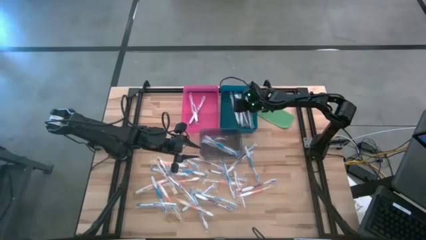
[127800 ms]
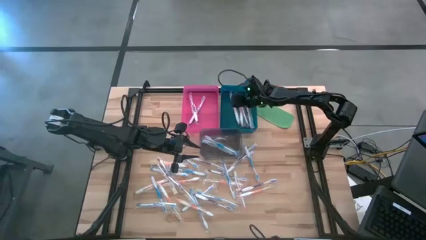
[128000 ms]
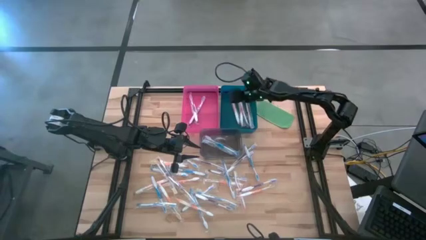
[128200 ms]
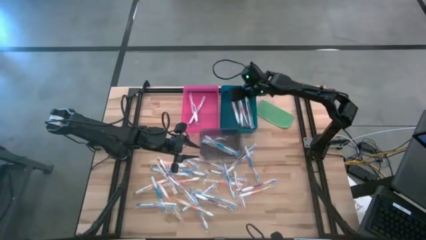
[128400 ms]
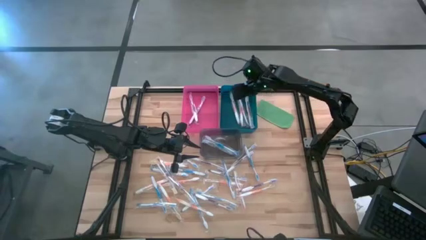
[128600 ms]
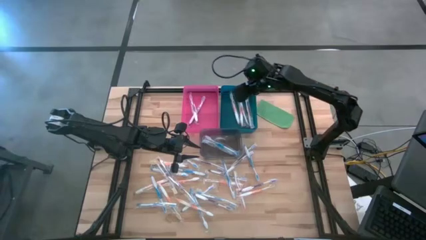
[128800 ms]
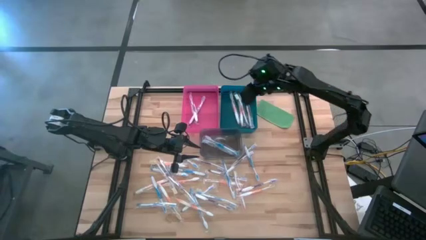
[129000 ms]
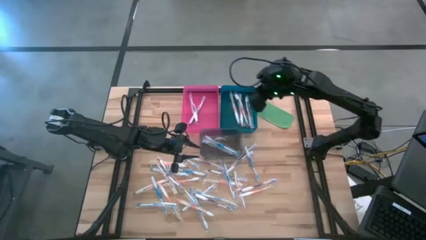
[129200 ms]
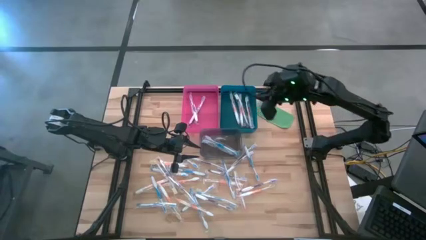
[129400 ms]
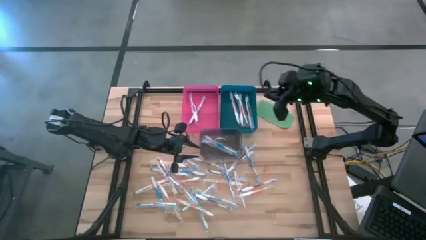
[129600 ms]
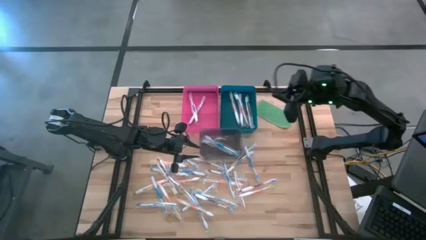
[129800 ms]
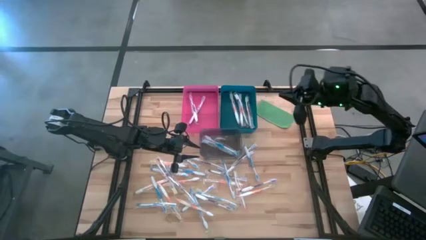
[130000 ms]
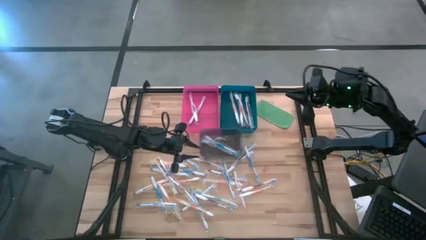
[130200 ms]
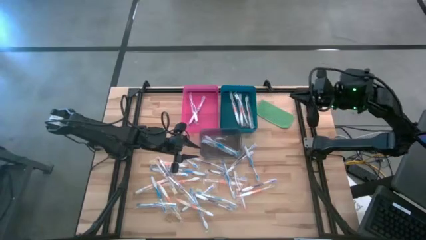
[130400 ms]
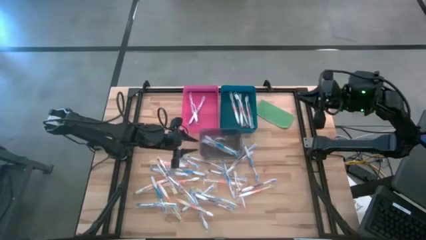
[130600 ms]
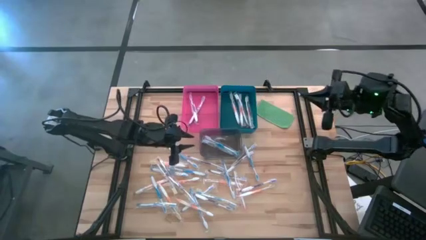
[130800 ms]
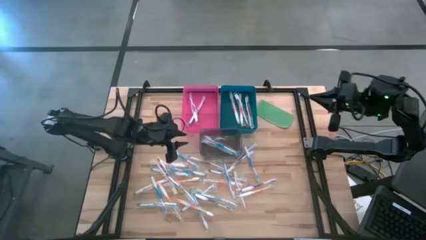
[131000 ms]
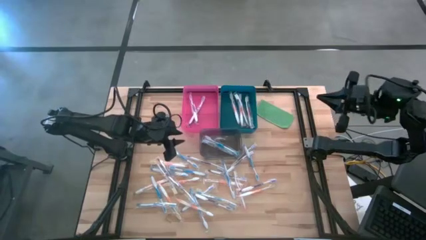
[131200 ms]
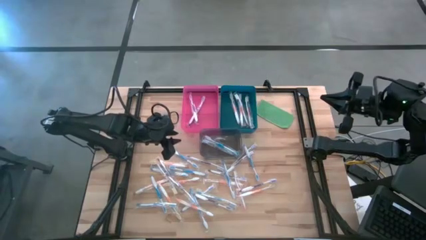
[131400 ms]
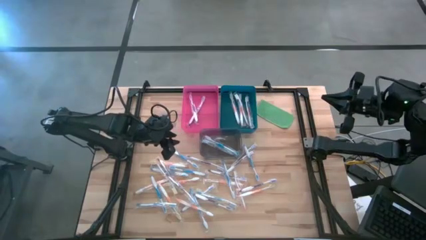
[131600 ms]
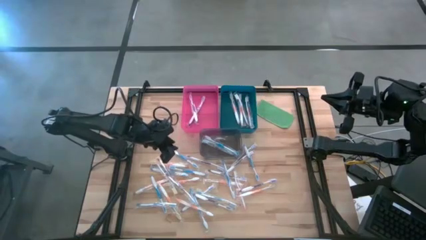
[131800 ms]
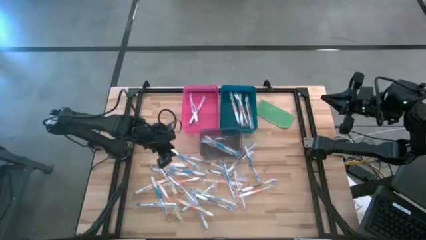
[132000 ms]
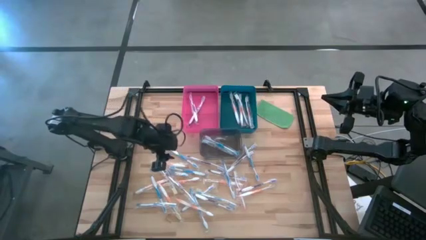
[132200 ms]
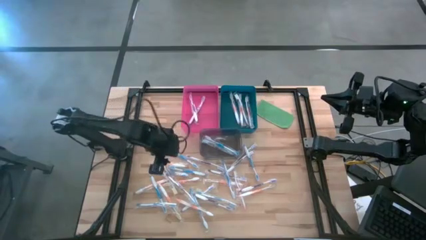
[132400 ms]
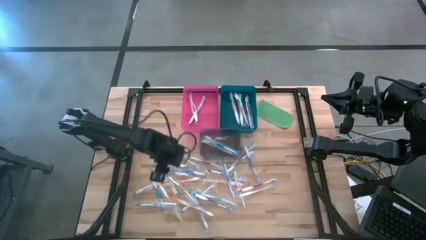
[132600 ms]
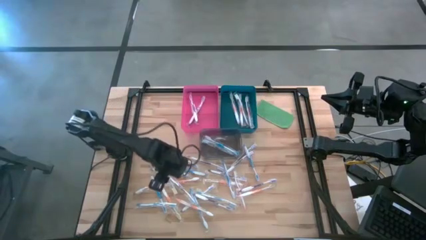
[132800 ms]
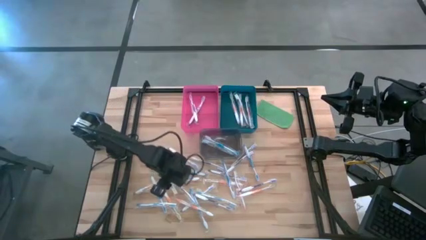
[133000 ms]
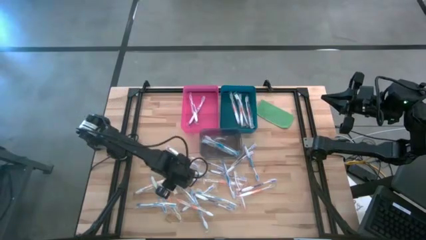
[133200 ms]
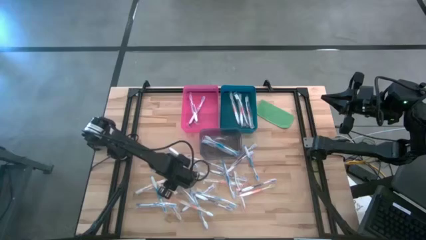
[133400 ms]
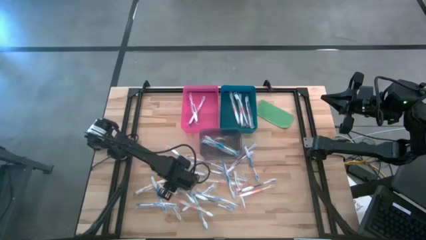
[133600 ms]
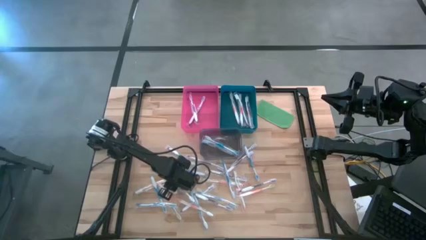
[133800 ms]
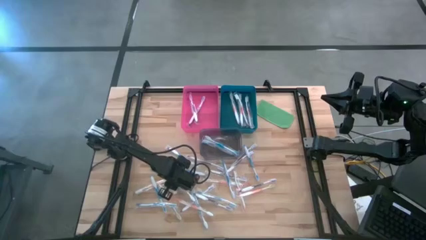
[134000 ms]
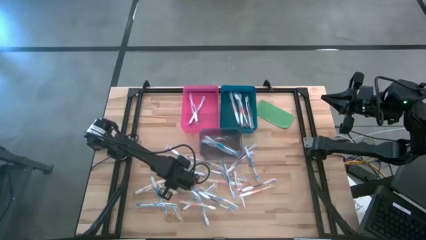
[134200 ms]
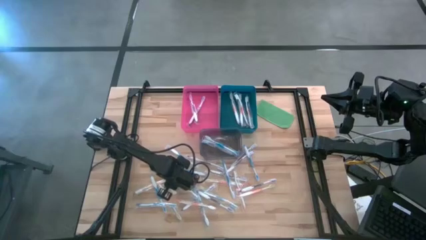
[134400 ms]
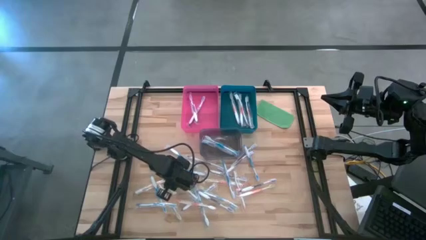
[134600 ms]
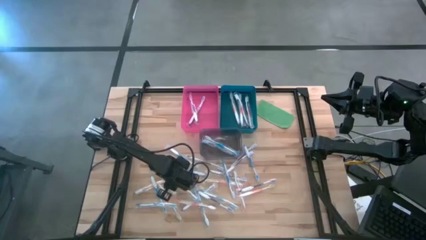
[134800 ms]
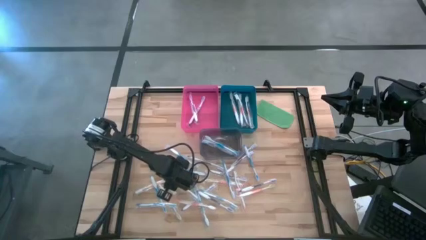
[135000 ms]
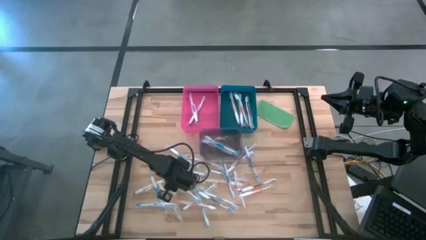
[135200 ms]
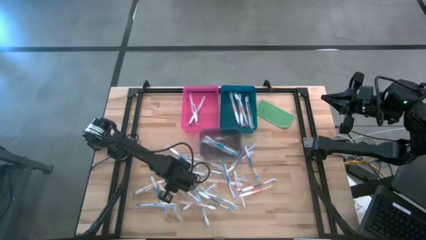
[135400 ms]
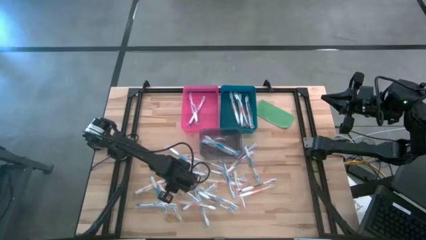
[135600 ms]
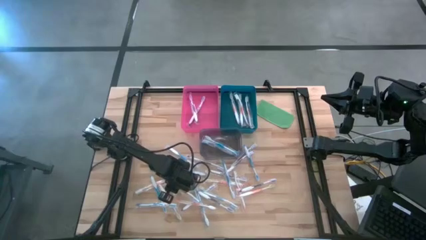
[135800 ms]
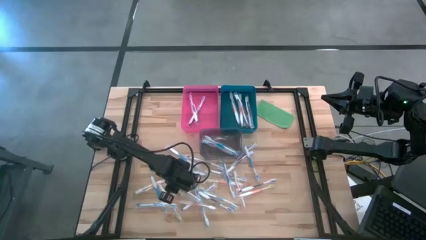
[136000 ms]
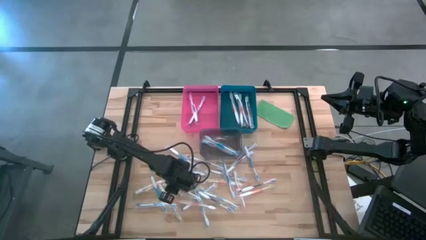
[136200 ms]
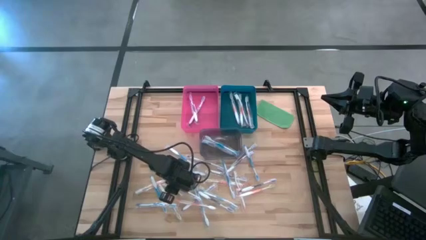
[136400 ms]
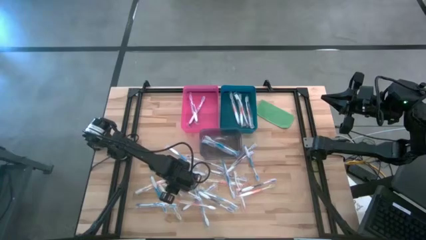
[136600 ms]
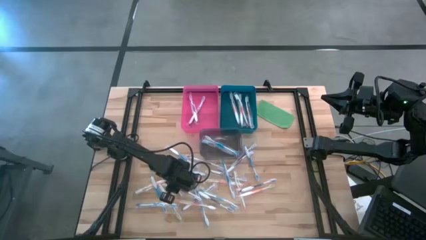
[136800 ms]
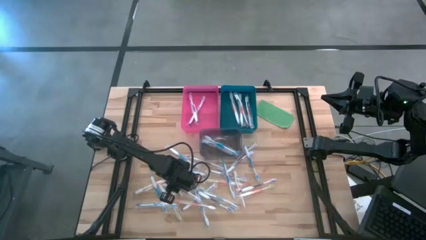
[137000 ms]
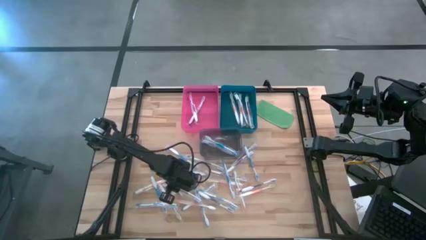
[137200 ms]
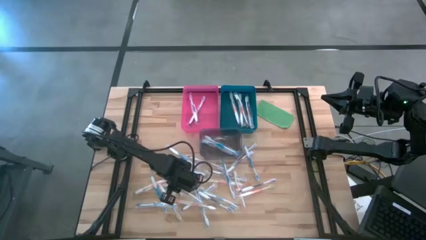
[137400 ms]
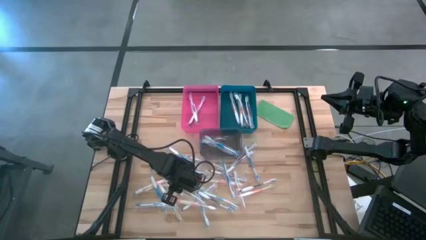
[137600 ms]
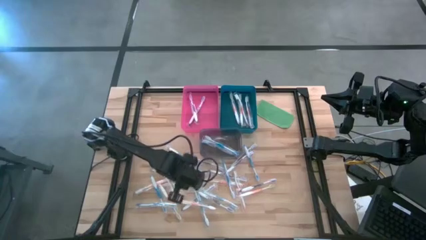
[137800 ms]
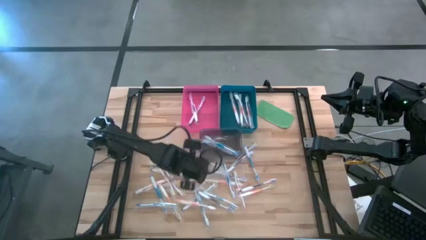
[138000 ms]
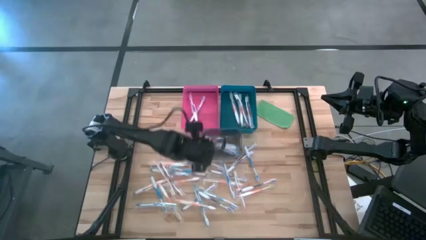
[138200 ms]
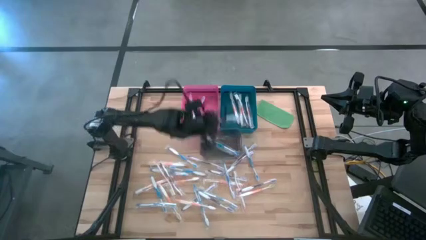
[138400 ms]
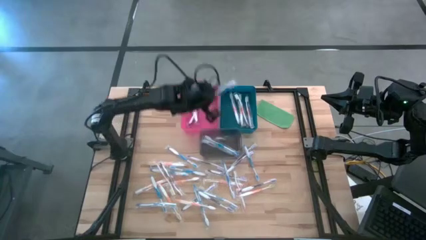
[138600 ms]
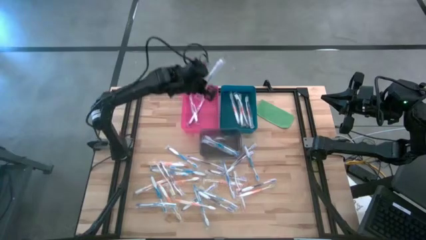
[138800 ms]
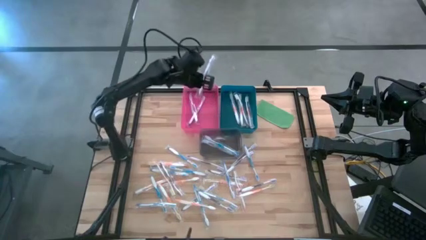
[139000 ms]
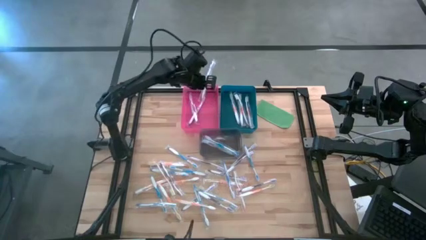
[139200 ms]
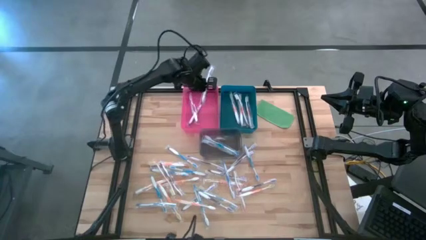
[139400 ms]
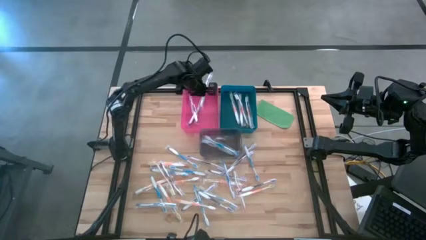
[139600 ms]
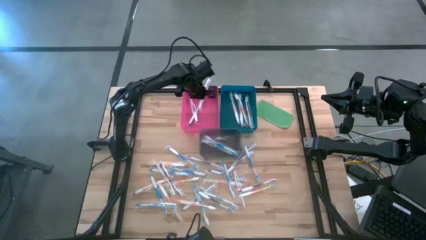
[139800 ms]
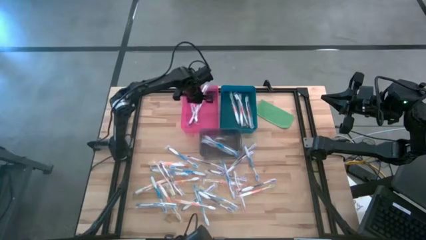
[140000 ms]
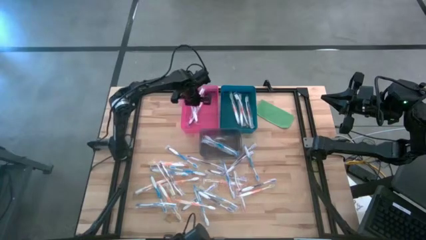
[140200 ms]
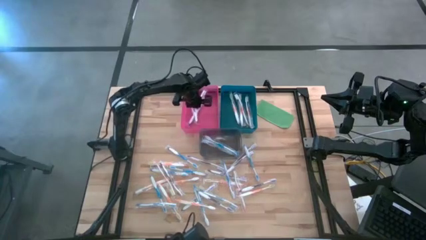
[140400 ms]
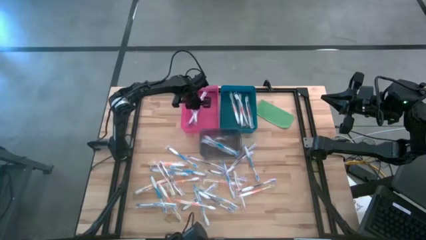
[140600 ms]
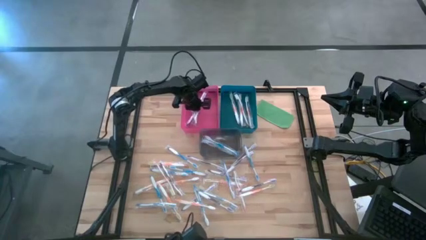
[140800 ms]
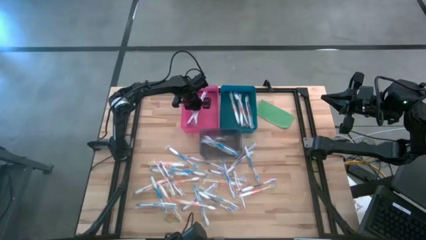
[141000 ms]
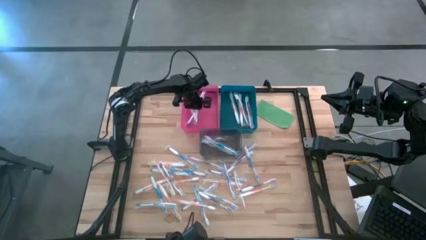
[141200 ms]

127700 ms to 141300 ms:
Task: Pick & Place Toothbrushes
Put the purple toothbrush into the pink bin

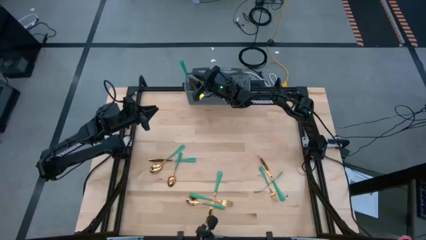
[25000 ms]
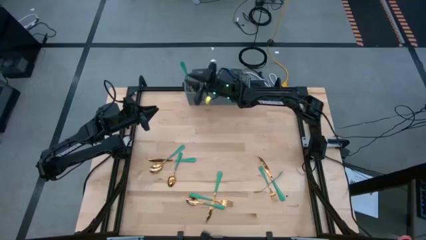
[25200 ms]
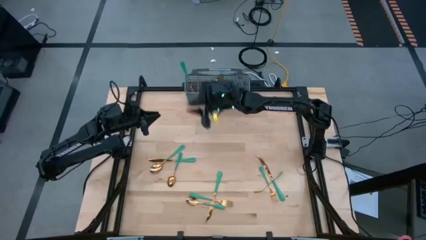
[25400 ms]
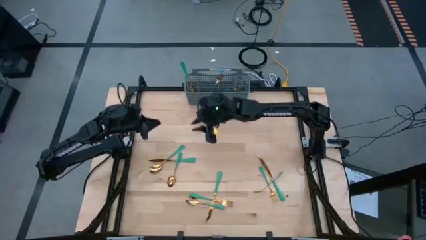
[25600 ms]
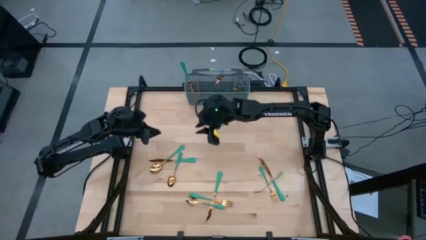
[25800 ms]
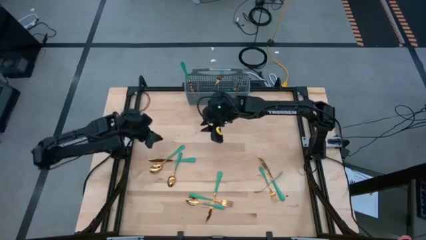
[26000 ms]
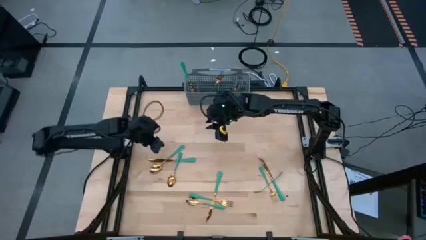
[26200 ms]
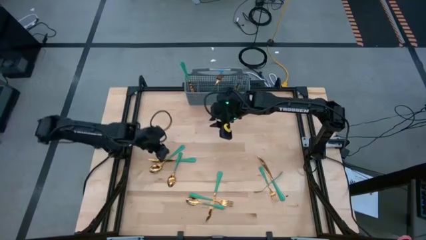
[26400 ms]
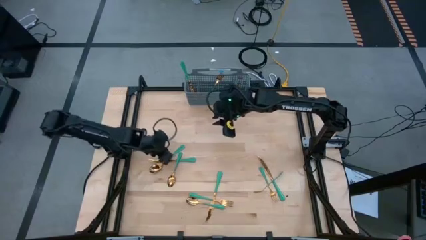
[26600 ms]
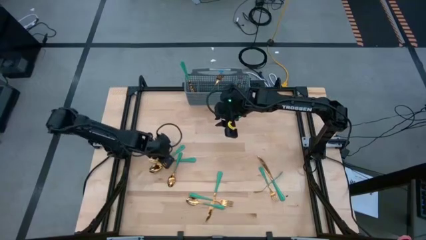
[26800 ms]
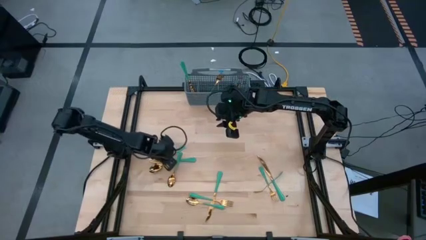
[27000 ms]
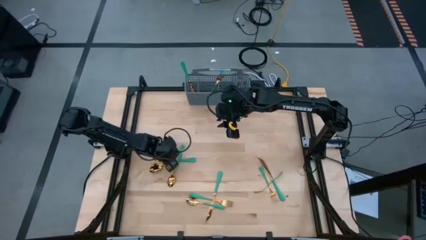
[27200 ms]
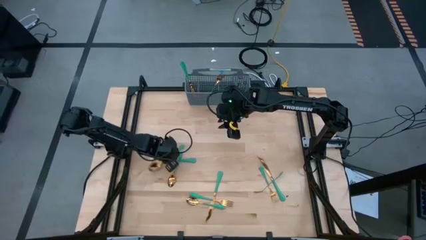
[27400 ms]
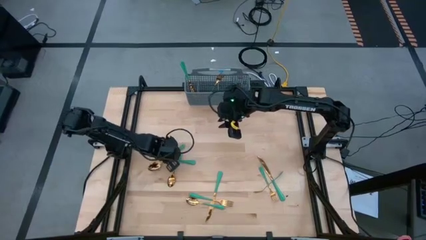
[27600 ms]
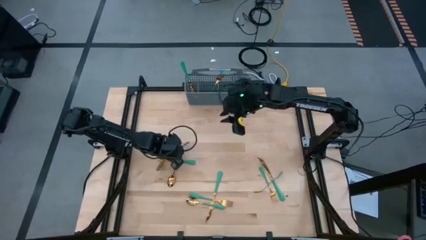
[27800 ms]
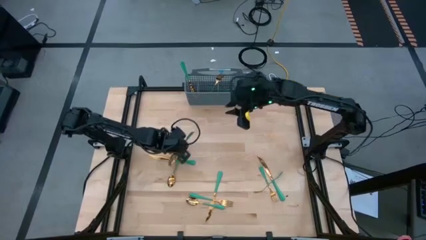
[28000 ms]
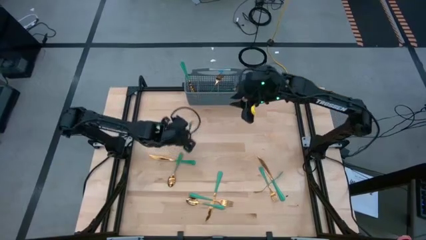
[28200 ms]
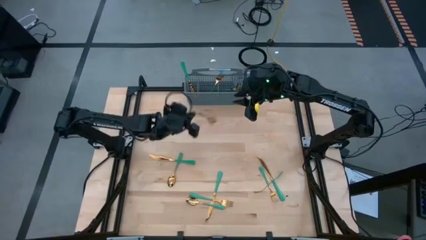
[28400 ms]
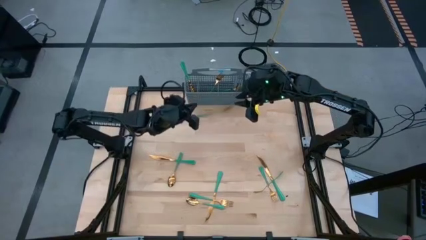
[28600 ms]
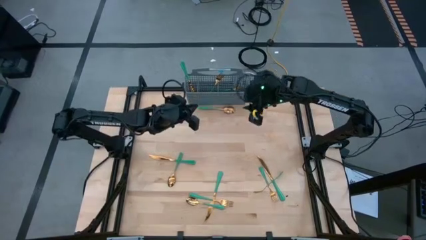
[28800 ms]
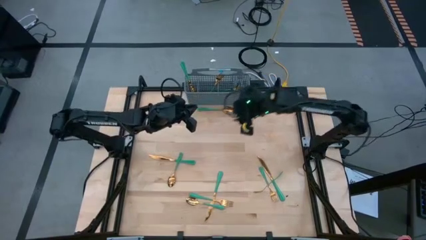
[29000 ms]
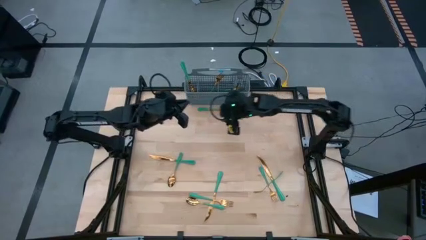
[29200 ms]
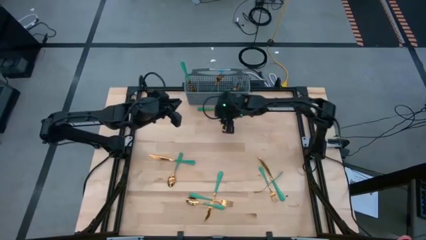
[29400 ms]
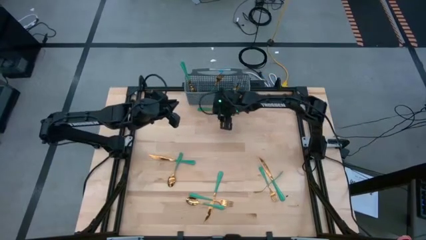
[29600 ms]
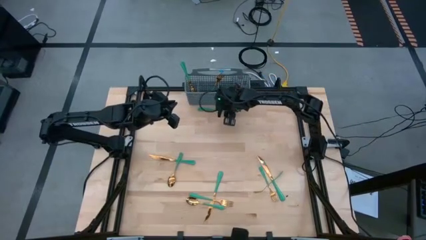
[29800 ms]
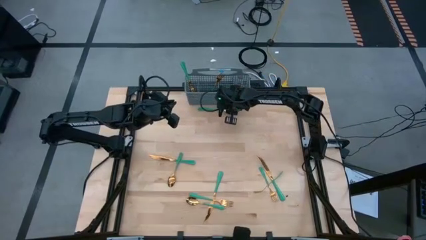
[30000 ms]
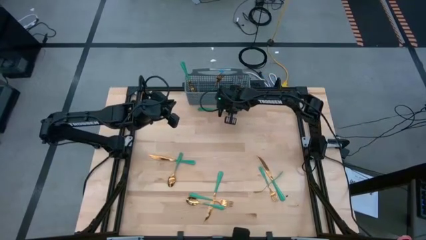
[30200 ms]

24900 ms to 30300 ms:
Task: Sort silverware
Put the green spoon into the gray silverware organizer
